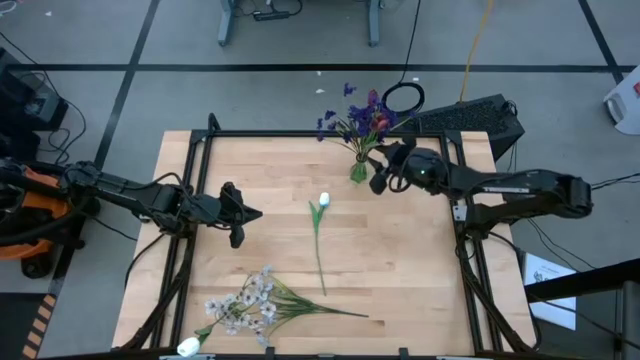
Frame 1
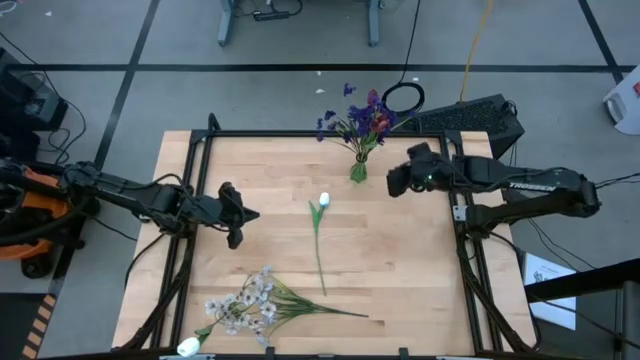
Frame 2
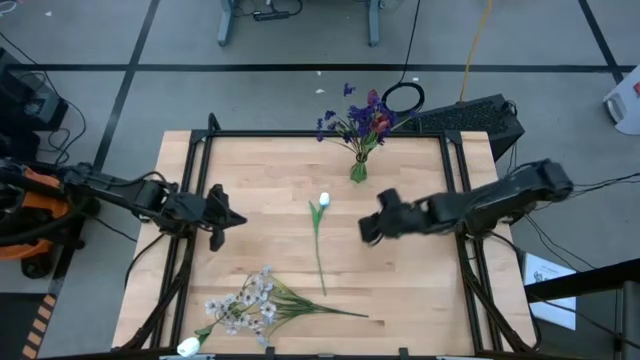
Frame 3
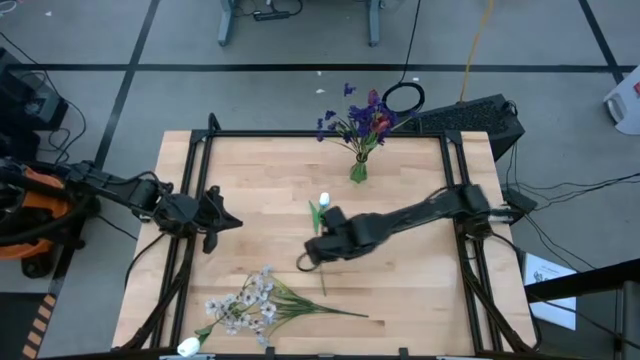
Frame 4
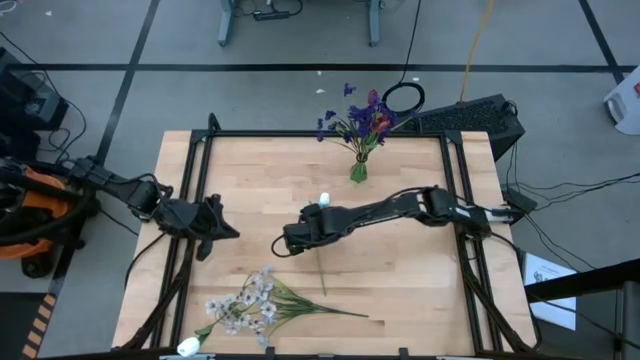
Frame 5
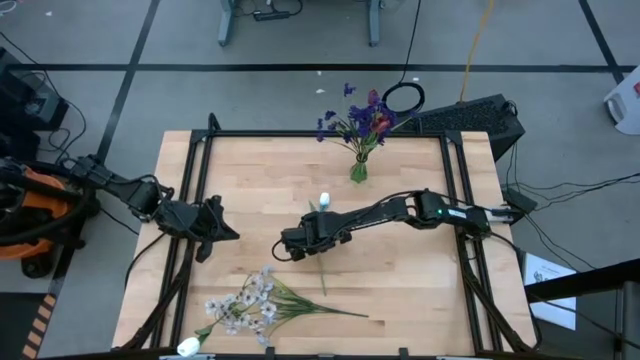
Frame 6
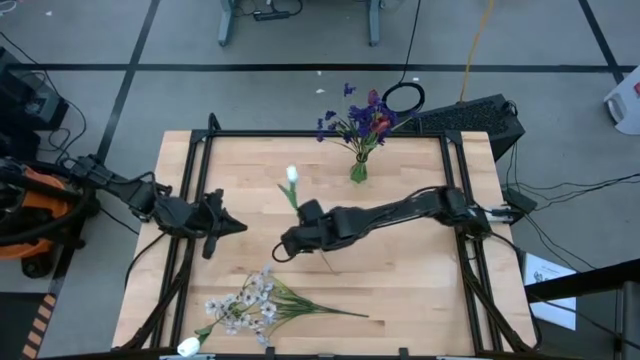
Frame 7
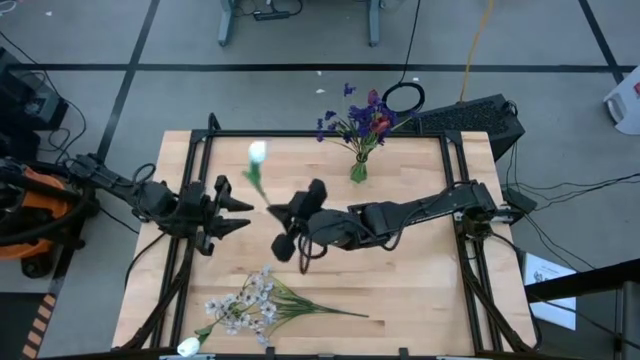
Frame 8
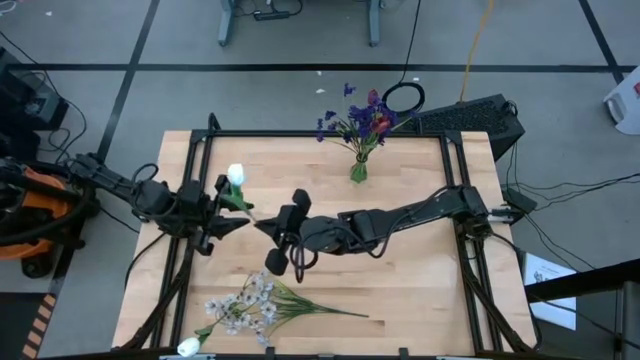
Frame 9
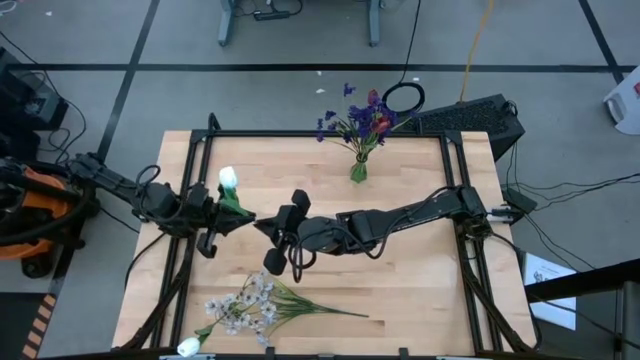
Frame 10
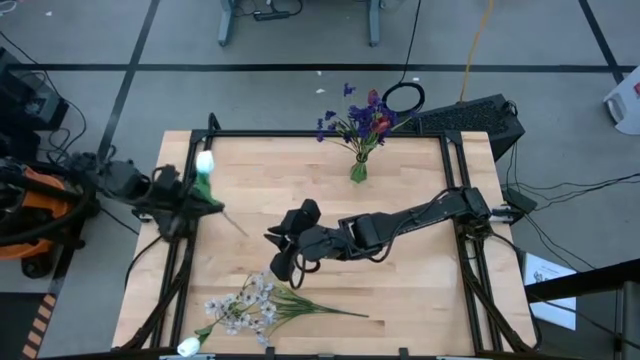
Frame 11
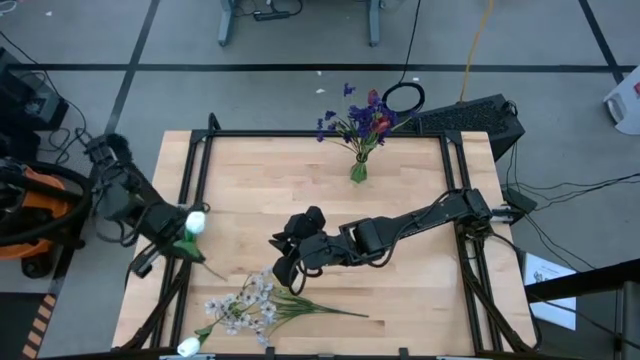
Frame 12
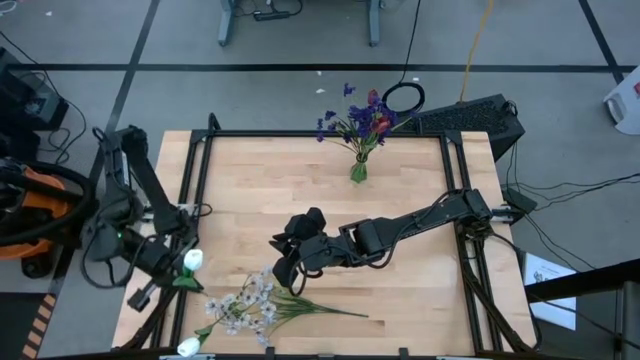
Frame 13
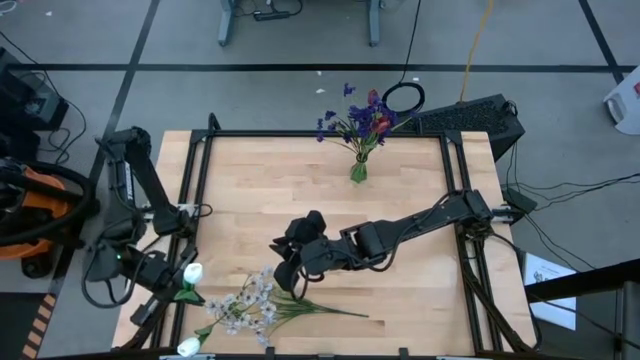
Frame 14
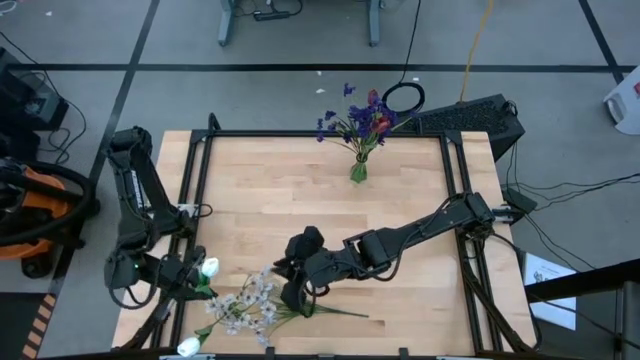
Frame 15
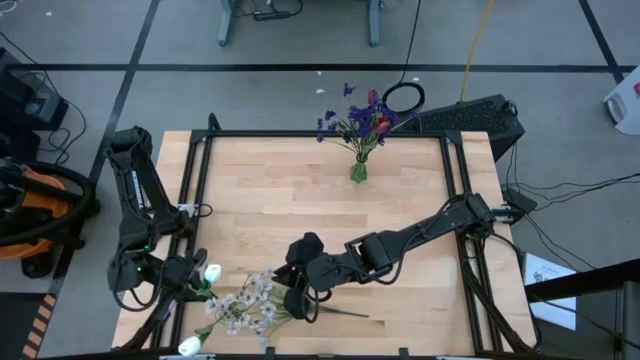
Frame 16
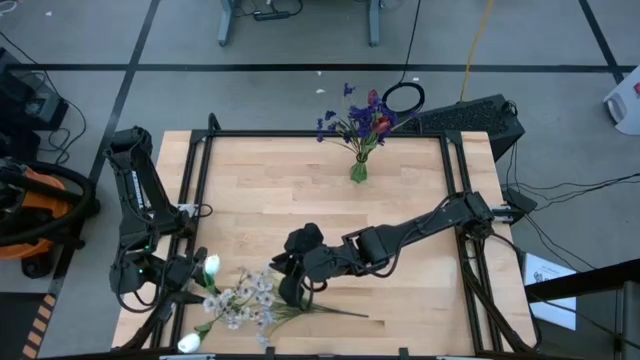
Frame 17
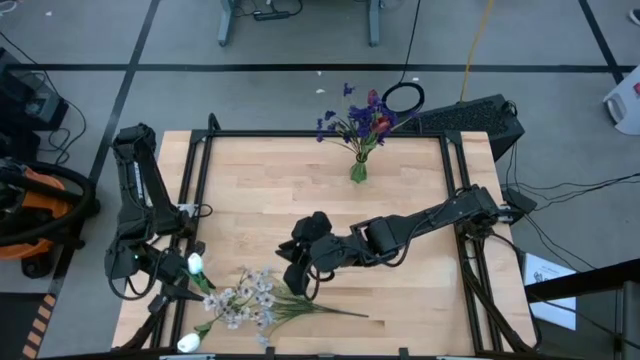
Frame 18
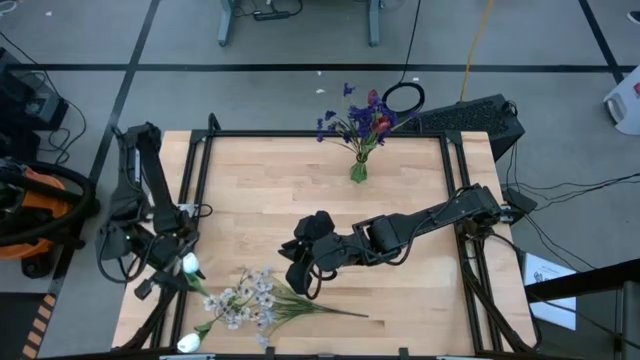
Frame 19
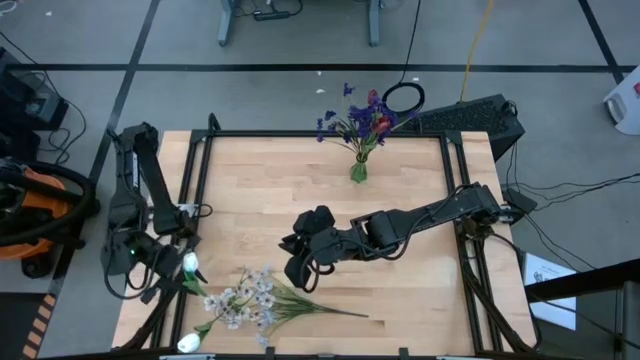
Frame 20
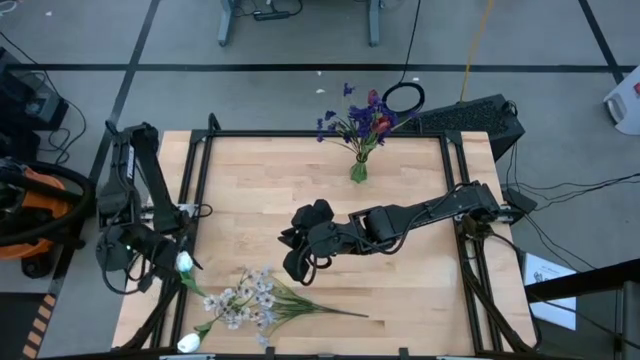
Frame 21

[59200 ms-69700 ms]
Task: Sort flowers into vase by color
Put the white tulip into the transparent flower vase

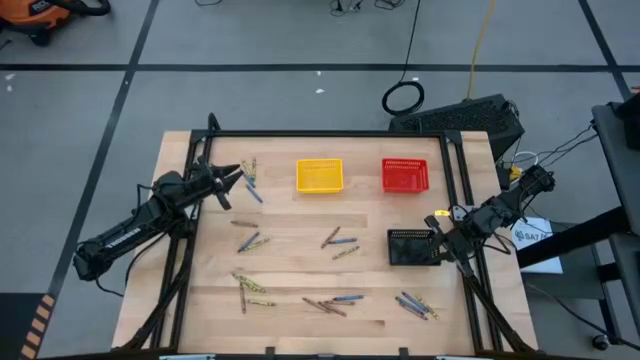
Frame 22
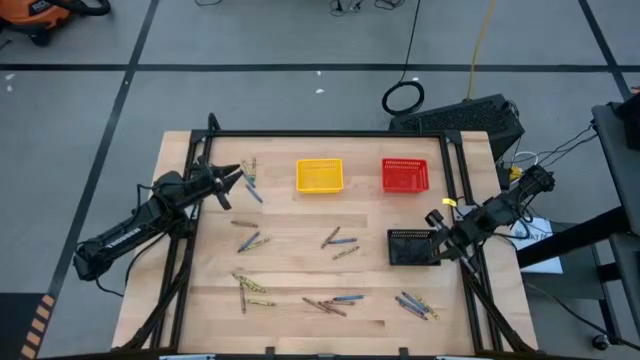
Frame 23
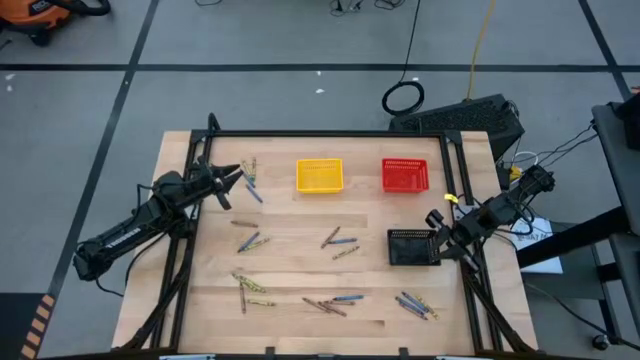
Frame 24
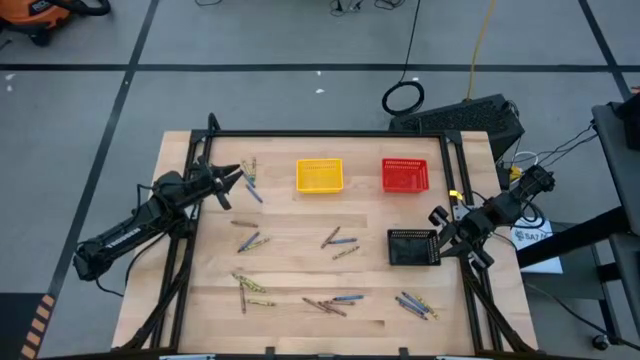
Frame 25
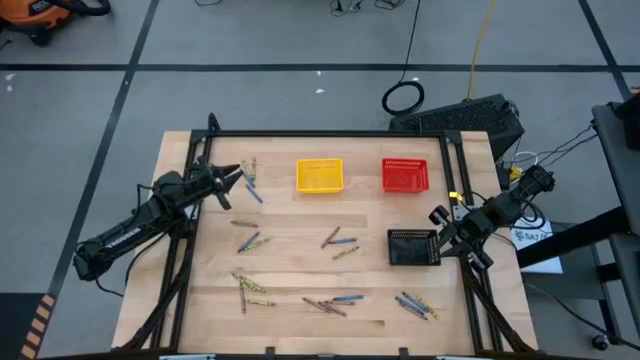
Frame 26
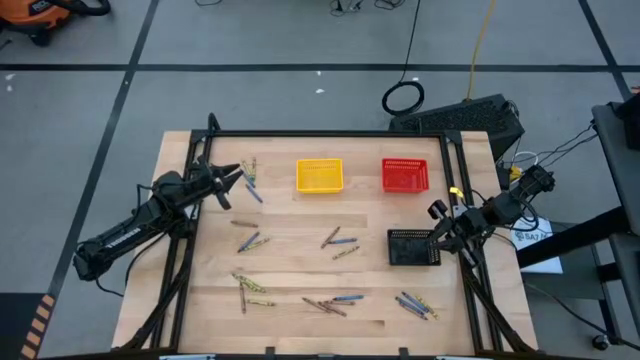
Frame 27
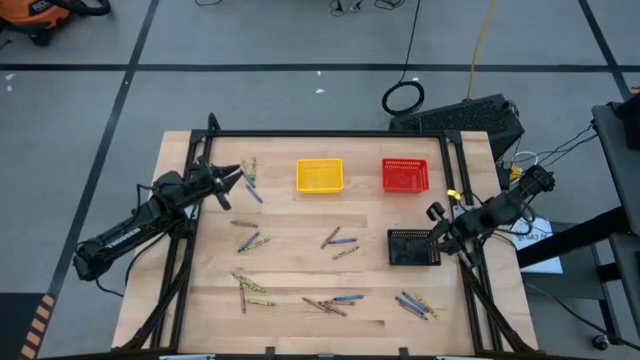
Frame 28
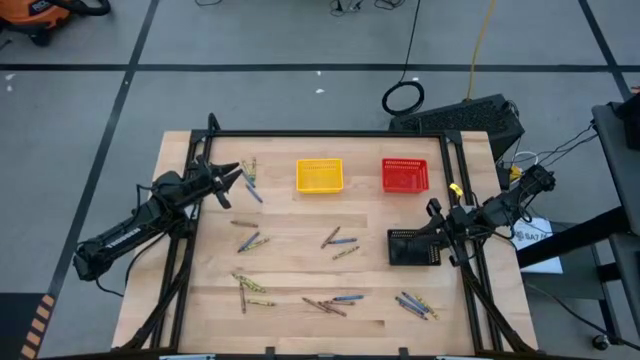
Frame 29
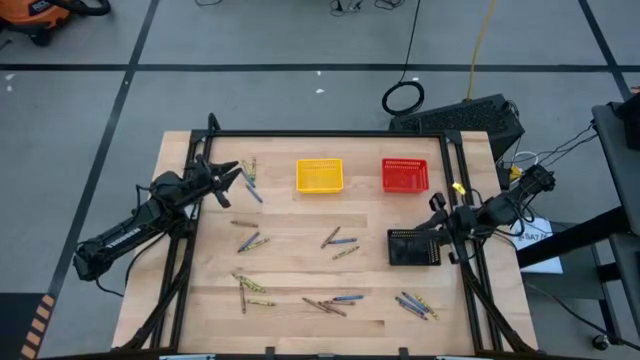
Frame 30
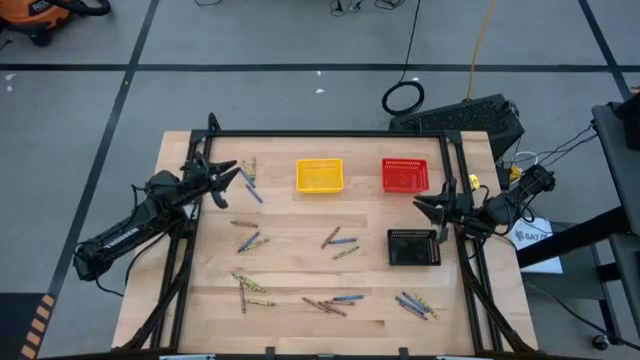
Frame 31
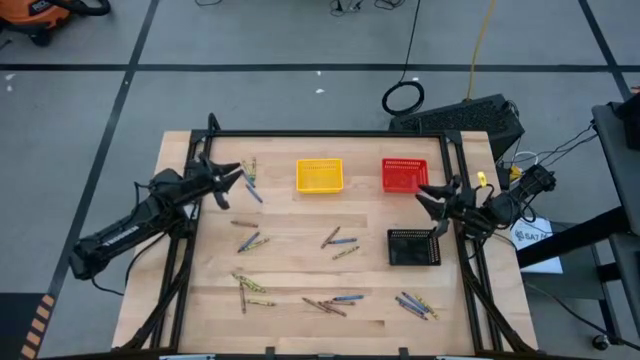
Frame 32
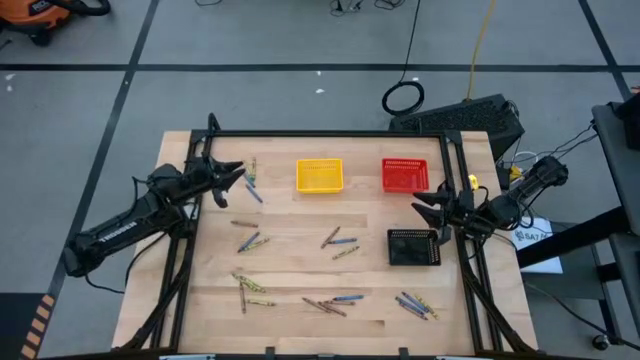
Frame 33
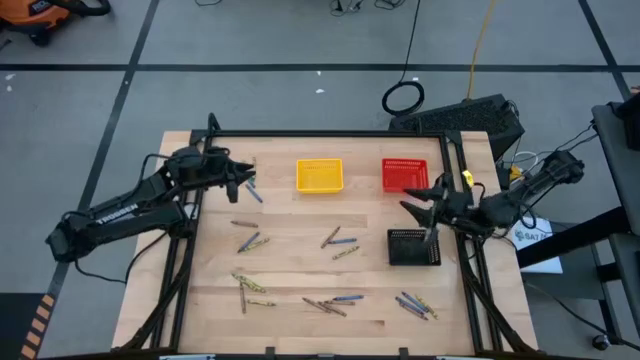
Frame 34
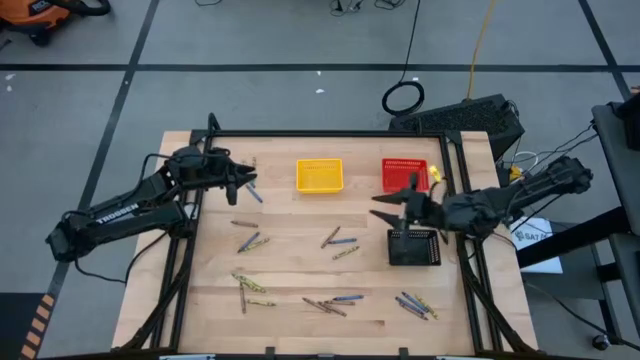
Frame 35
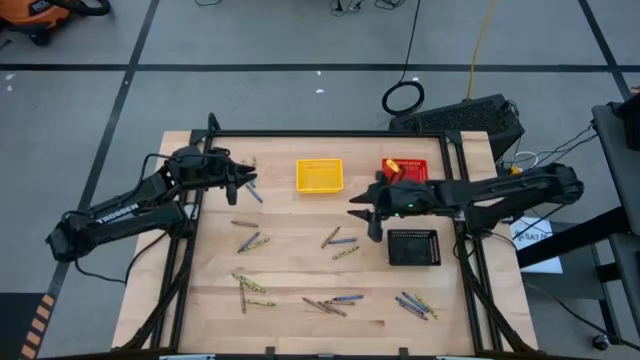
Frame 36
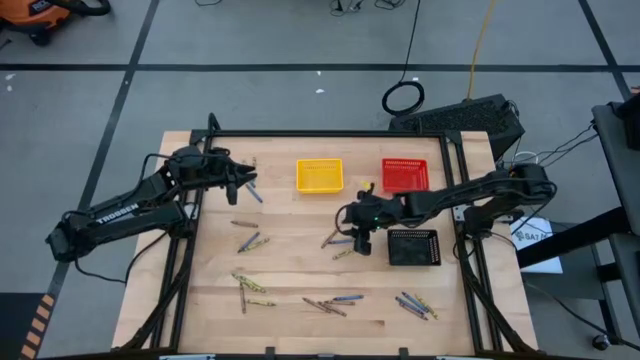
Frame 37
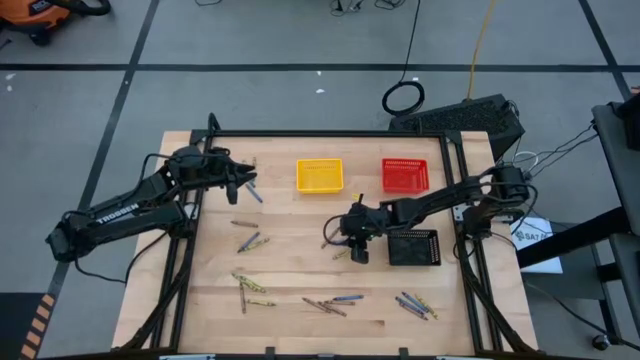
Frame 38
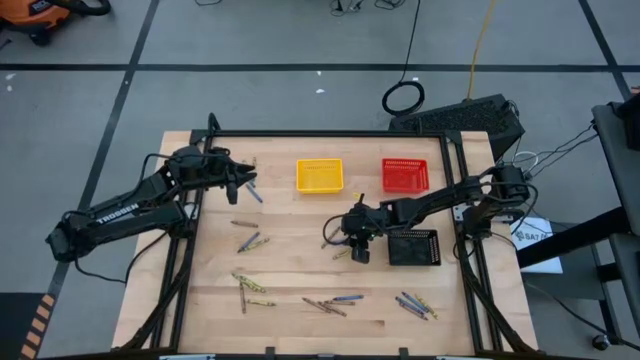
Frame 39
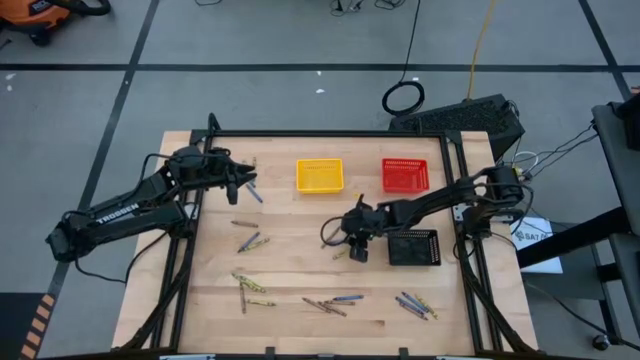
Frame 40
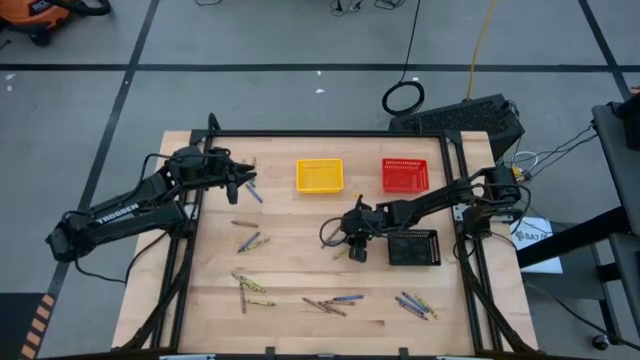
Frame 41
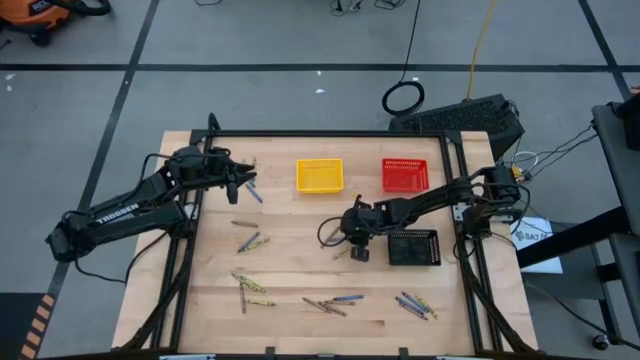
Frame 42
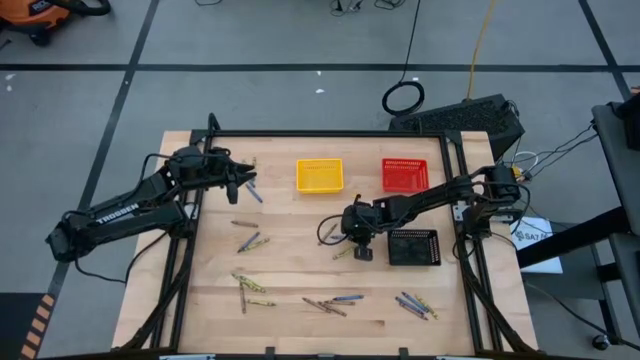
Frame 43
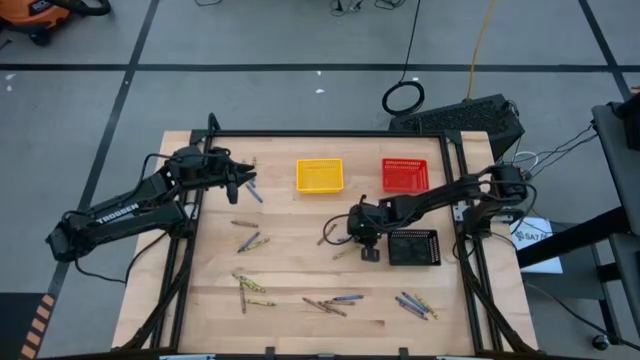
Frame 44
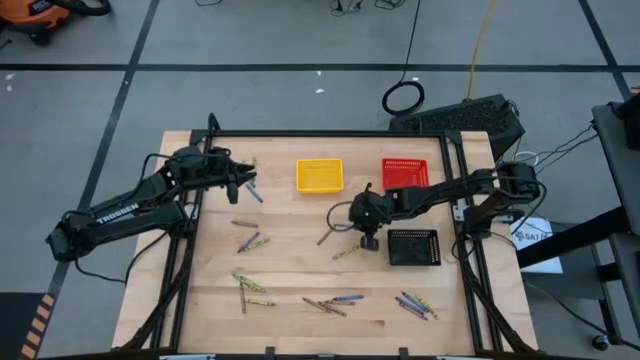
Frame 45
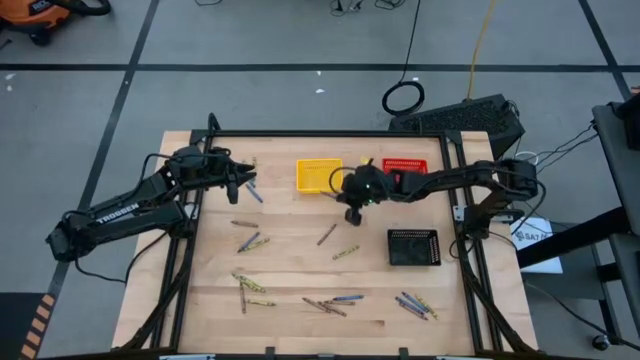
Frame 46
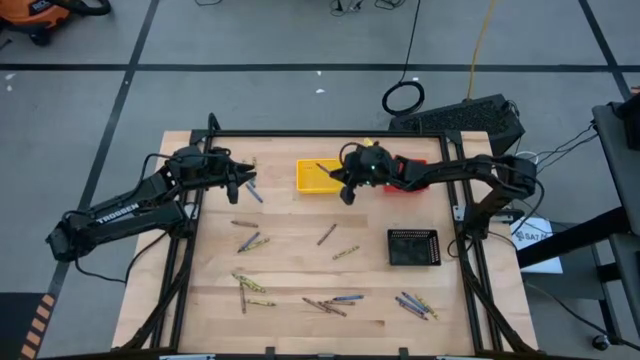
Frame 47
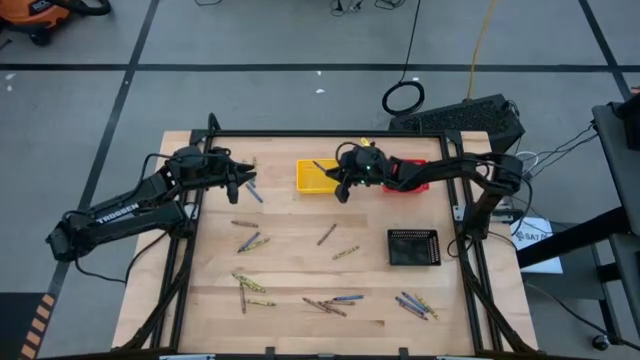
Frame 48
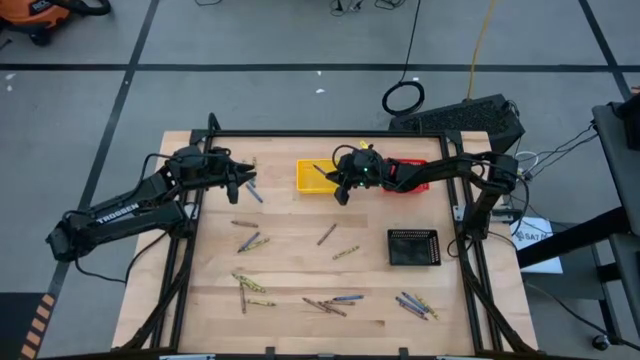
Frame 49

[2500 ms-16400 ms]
Task: Sort crayons
Put the blue crayon into the yellow bin
